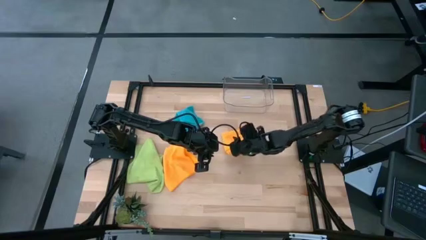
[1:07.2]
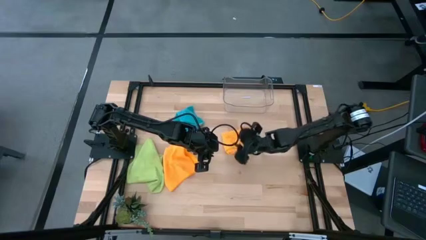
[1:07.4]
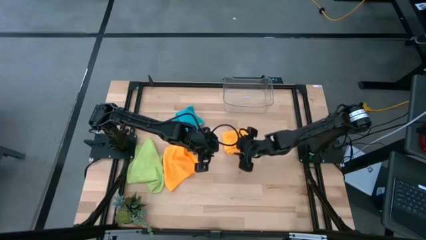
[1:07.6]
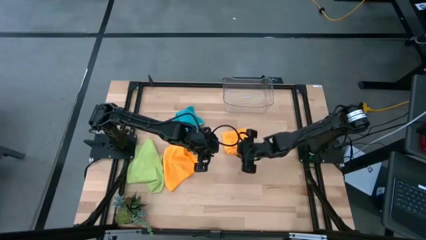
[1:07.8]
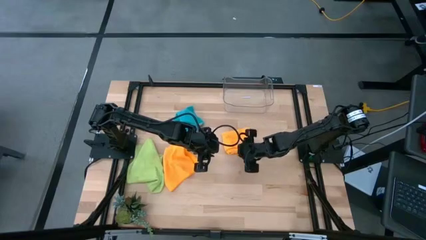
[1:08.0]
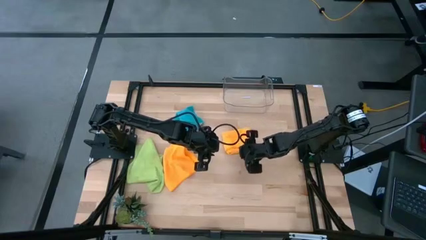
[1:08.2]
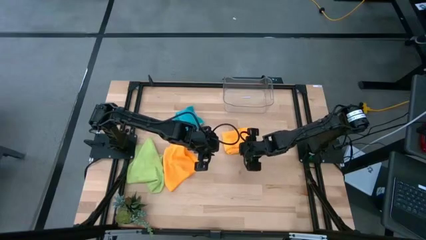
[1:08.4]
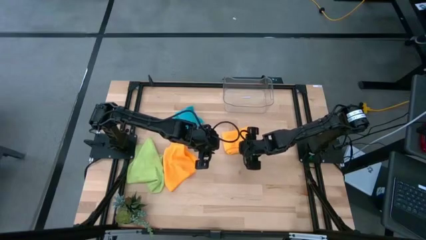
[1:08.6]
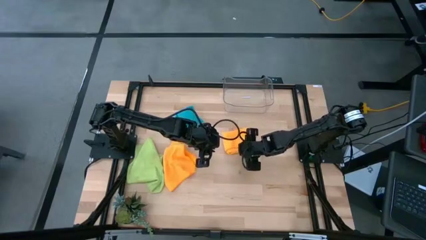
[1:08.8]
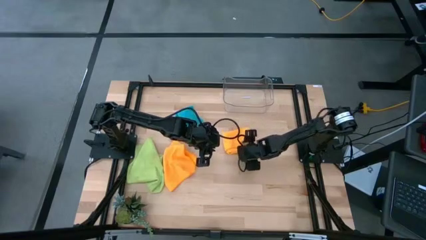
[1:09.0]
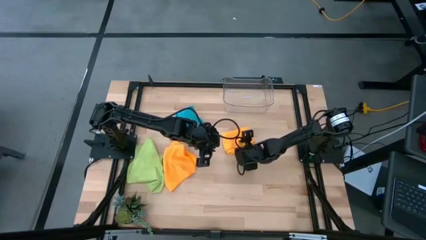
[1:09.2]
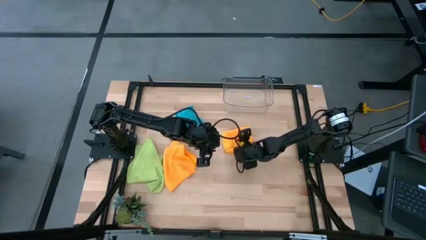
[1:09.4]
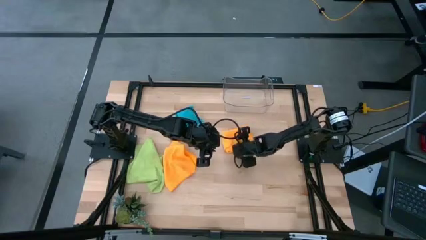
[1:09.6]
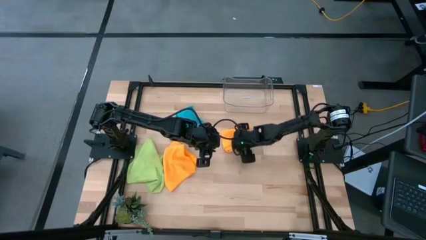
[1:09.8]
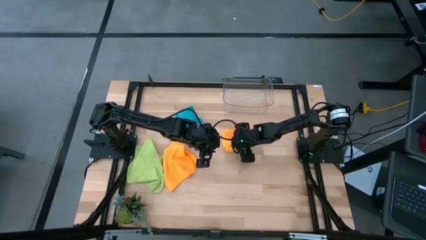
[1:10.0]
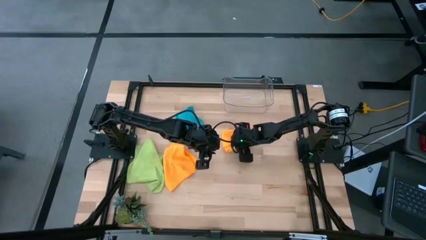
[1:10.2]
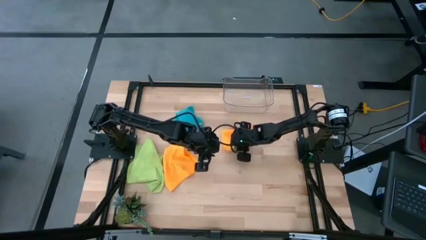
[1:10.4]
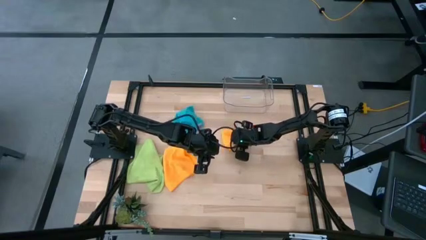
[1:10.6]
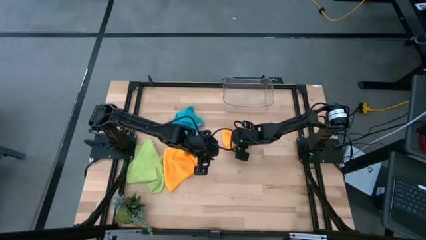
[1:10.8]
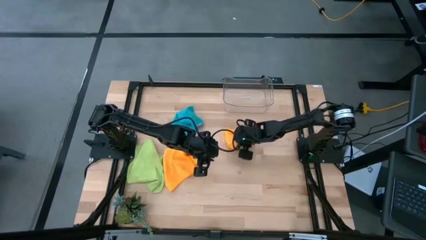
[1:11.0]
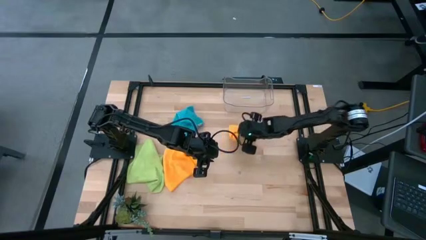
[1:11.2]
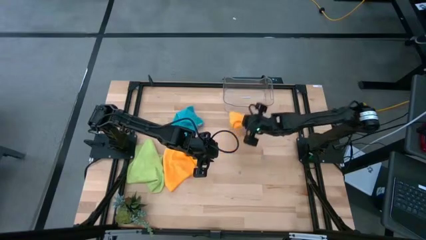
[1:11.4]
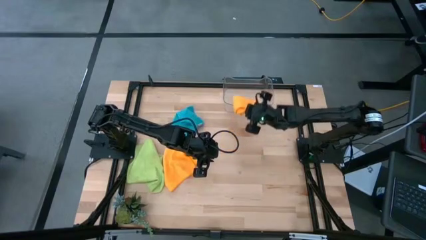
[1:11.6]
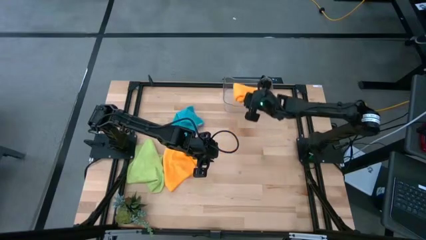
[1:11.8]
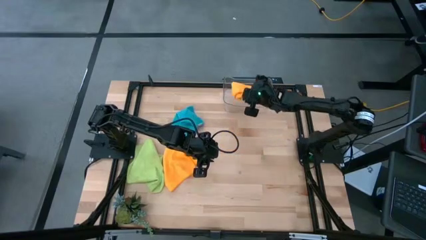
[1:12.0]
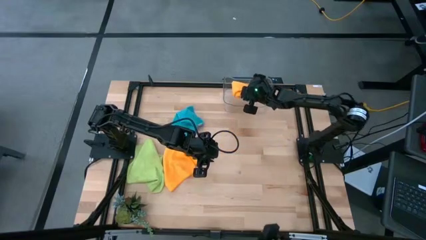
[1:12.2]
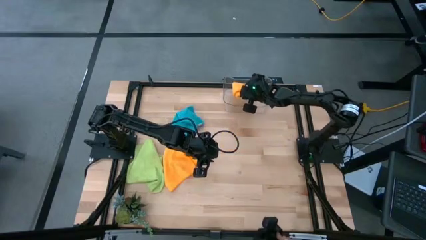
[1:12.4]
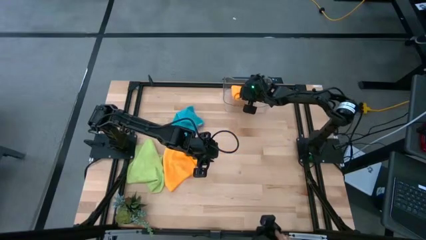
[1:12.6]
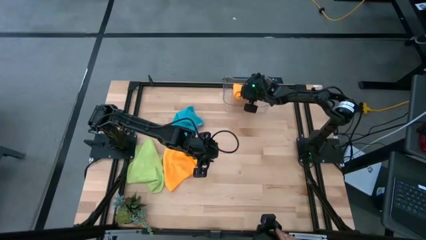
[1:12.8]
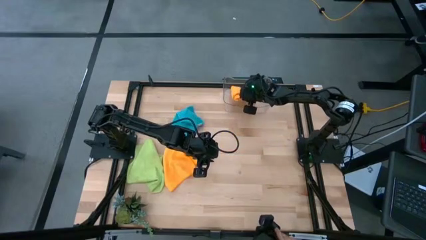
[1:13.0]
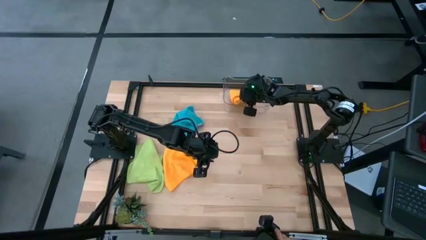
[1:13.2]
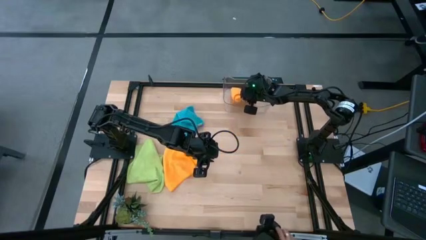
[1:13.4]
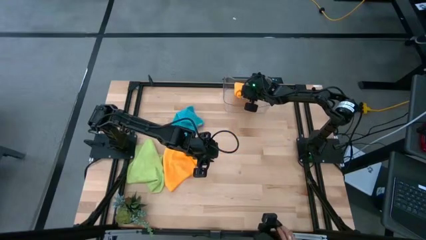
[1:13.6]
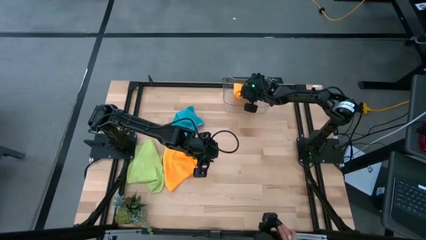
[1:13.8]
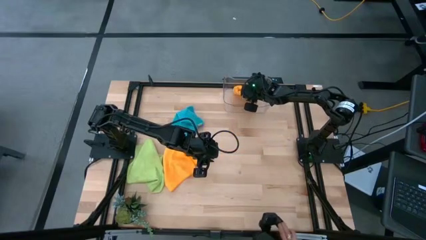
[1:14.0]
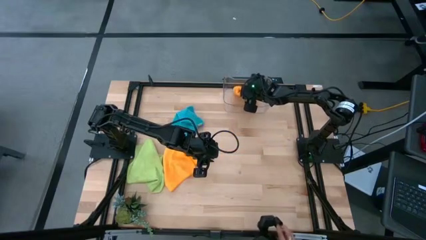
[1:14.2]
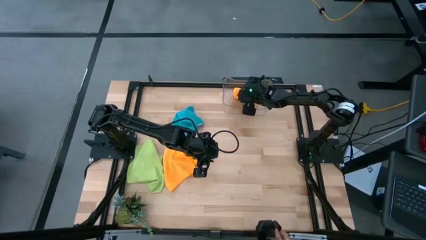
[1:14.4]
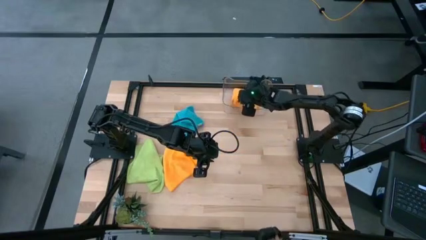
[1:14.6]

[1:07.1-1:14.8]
Task: Fold microfiber towels
Put the folded orange microfiber towel into the transparent bin

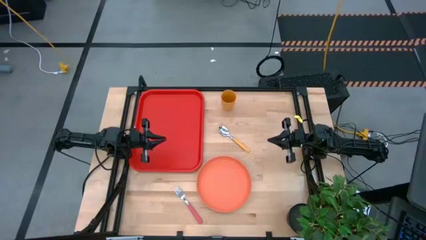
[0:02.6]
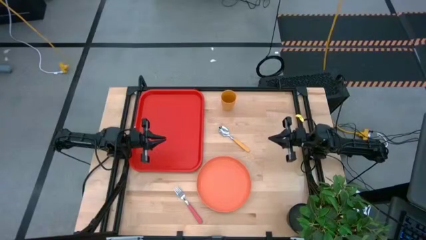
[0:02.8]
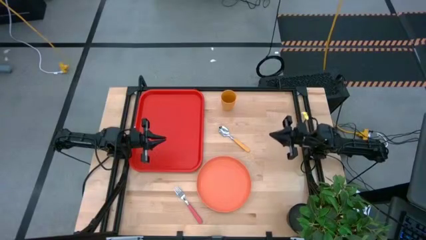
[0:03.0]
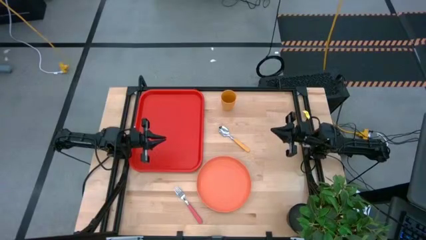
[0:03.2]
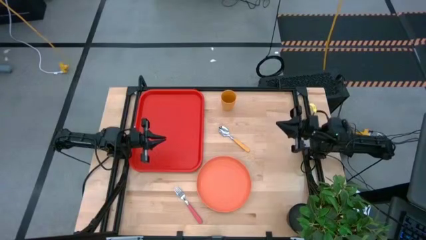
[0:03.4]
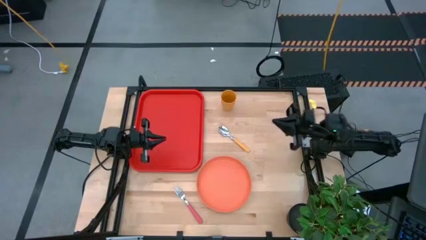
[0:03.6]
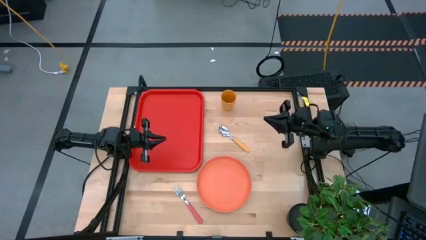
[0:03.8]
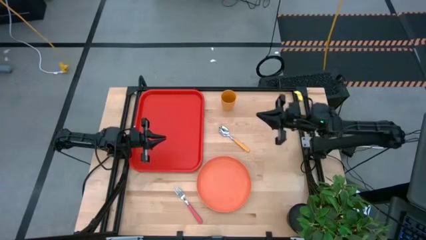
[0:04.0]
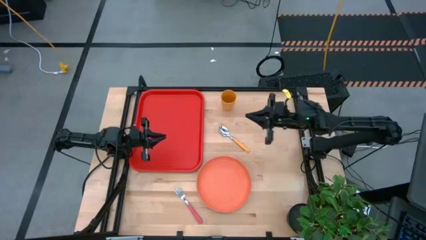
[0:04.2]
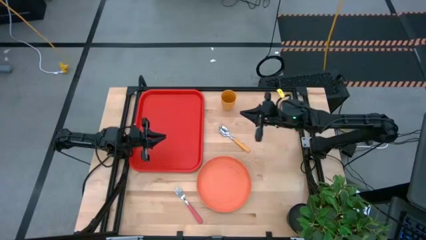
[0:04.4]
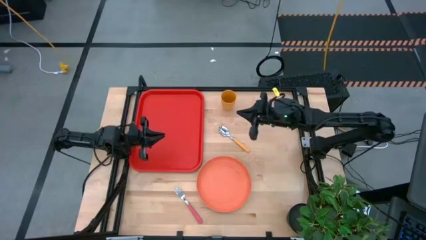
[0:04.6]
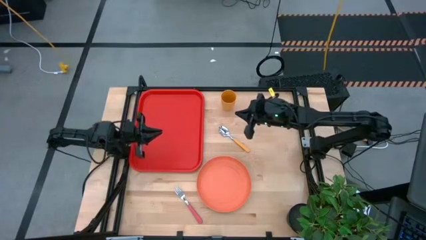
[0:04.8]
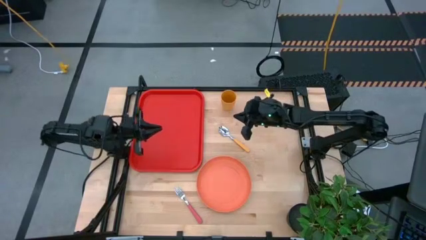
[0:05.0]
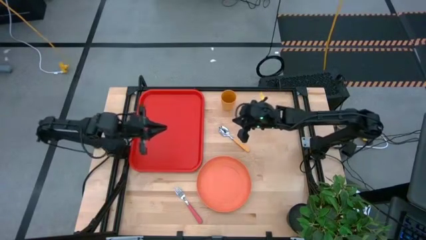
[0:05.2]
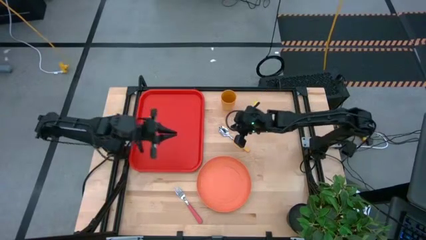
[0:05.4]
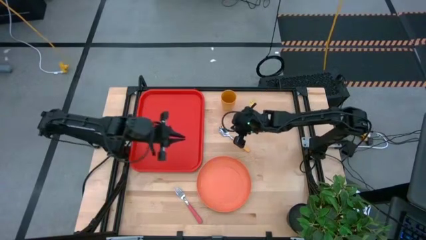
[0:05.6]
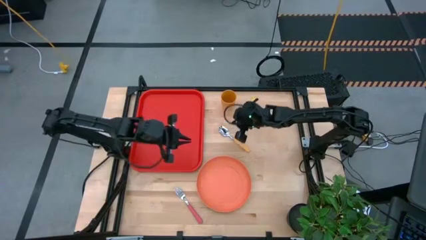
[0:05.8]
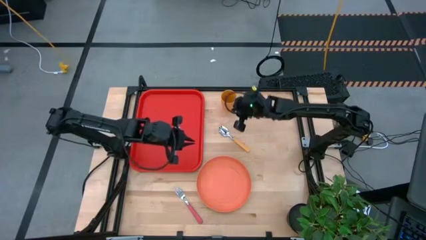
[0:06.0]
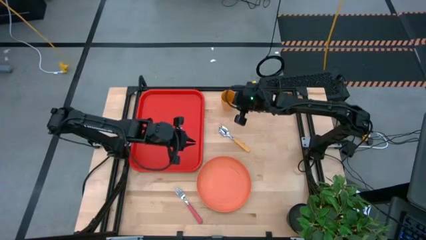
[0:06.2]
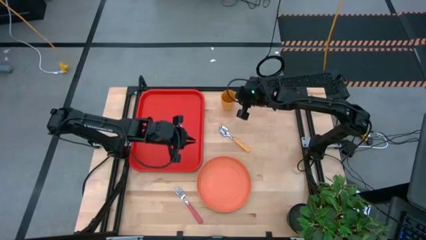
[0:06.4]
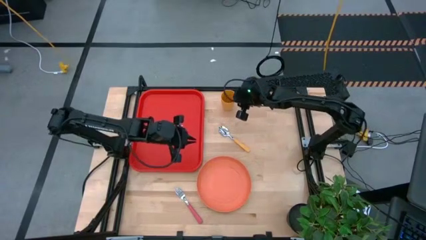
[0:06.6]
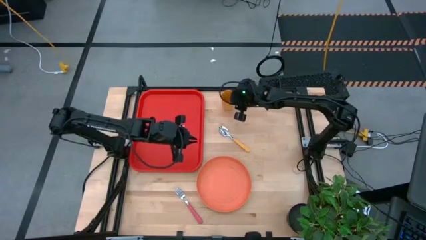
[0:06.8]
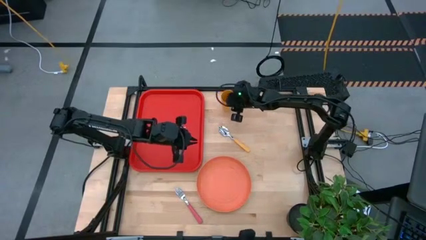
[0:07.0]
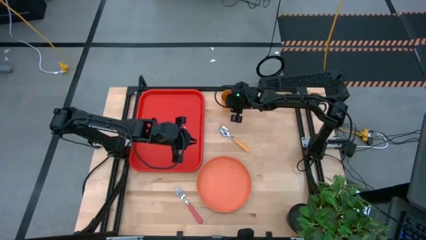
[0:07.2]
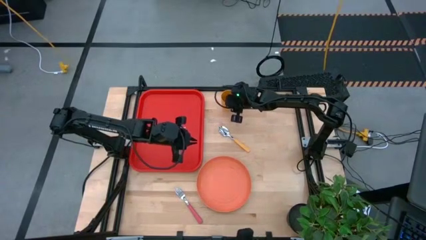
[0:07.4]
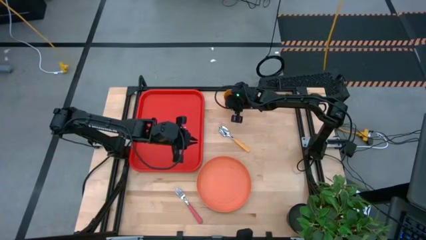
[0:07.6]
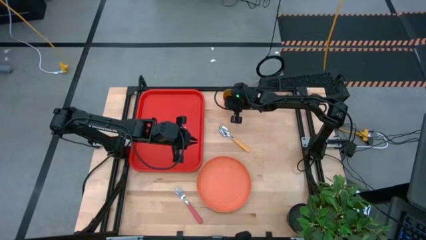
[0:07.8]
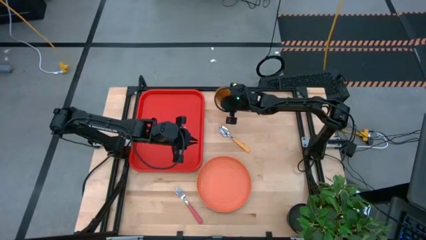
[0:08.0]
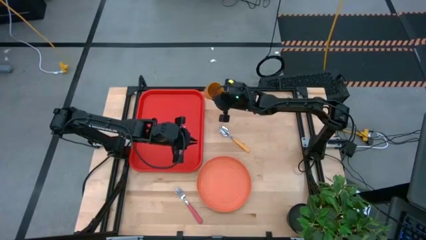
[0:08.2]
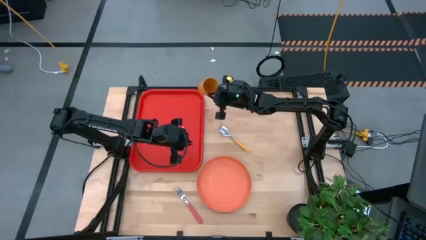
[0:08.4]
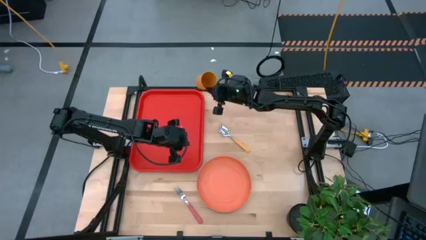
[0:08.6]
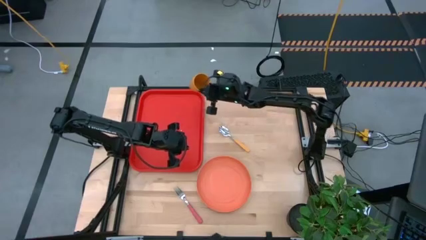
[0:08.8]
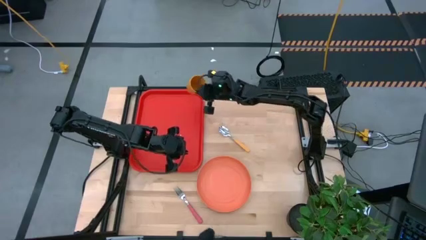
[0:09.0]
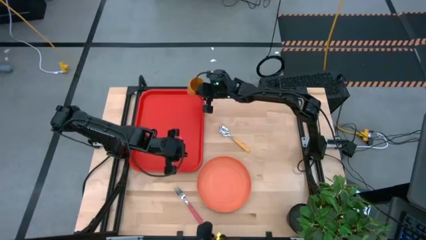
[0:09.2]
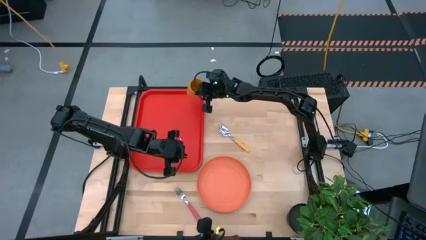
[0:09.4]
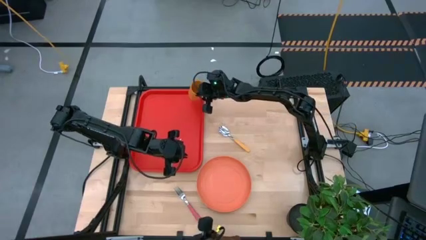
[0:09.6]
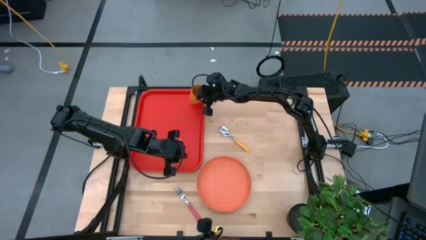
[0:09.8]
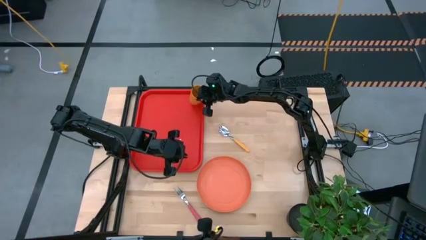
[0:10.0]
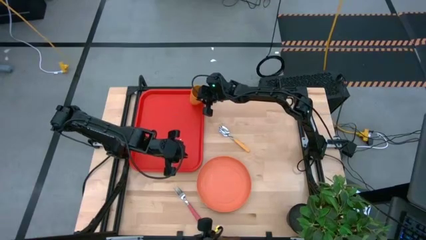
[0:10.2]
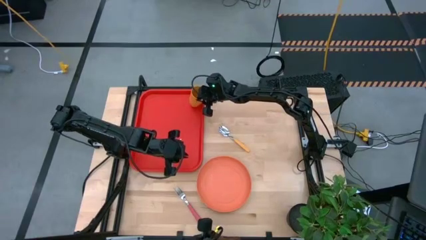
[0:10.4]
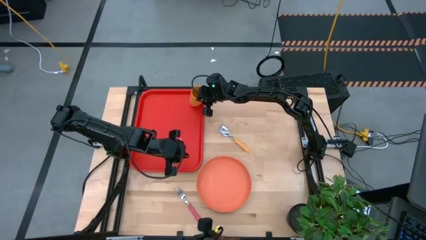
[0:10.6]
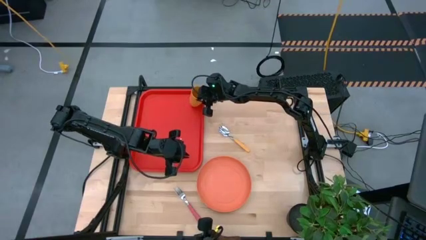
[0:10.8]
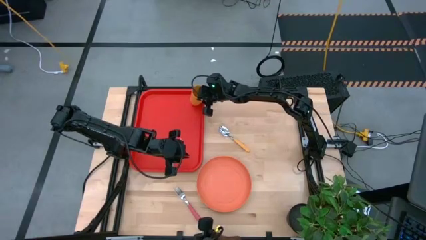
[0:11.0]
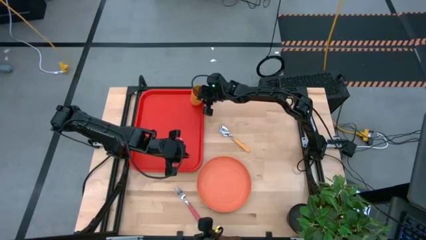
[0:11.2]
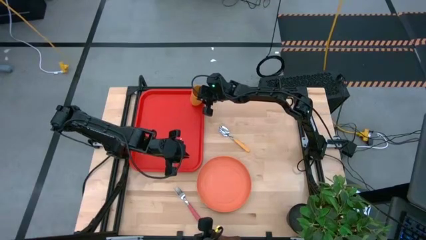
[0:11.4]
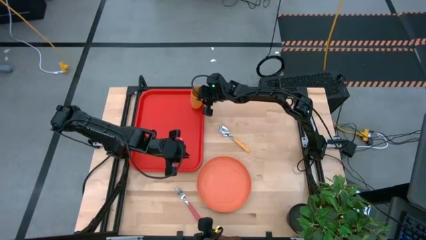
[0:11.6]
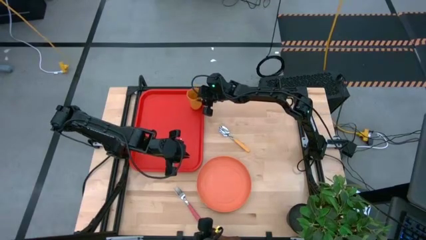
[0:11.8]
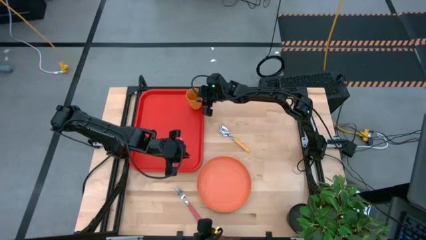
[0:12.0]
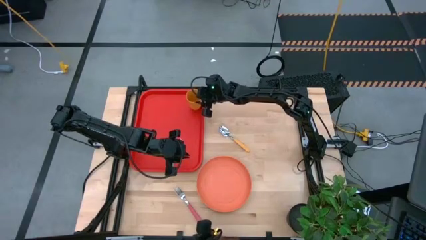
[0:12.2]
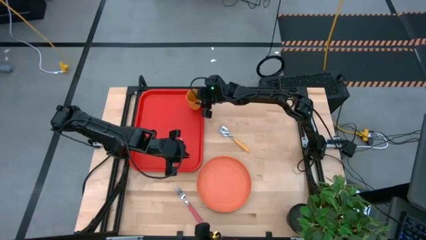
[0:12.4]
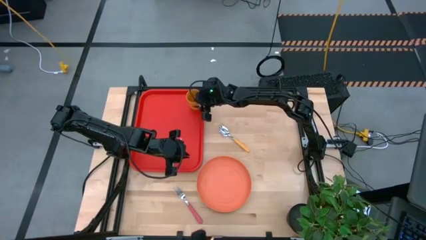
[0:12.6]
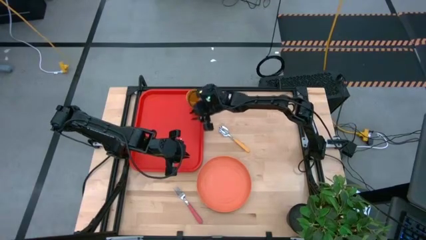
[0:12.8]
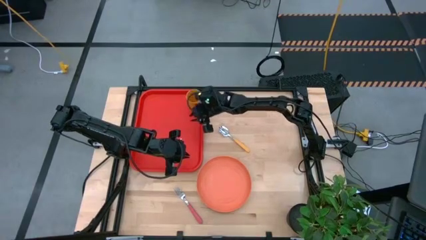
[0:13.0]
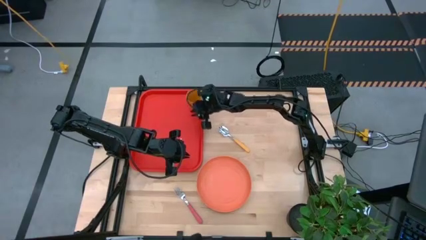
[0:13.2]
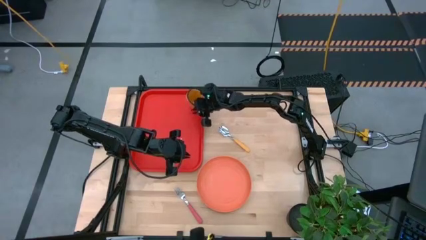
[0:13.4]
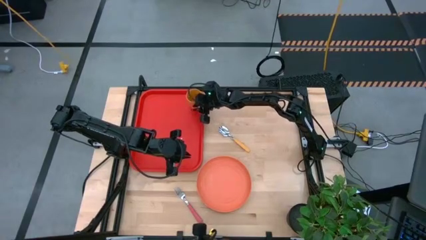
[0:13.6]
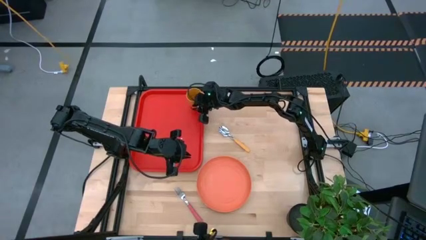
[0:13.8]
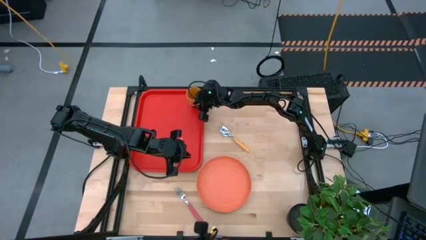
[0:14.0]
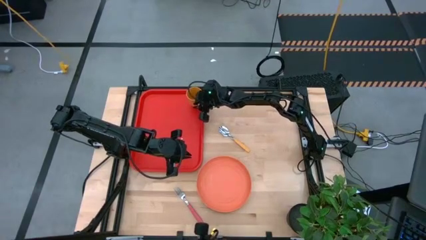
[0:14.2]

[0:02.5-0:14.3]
Task: Pick and place plate/cup/fork/spoon on tray
Put the yellow cup on the red serving tray
